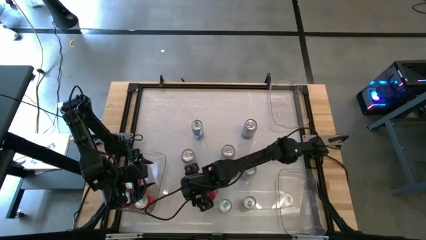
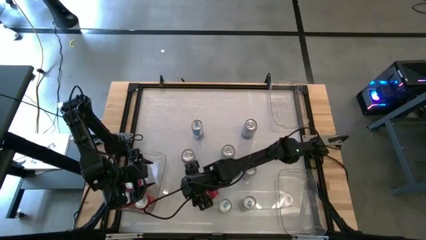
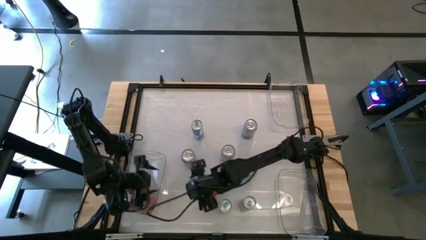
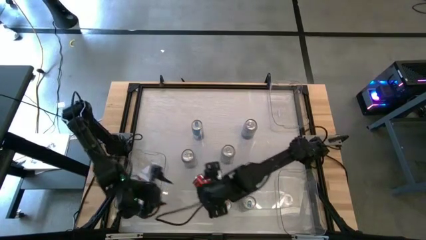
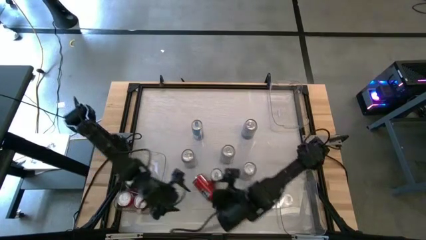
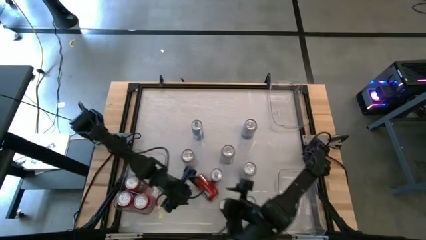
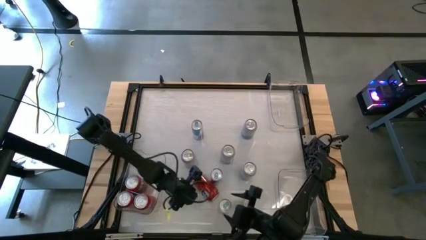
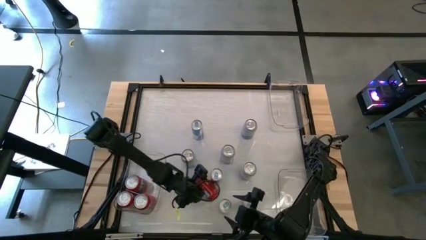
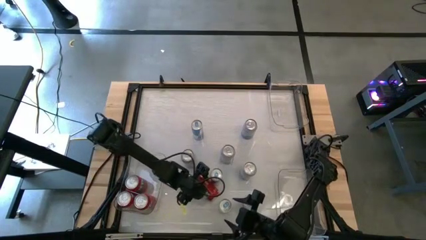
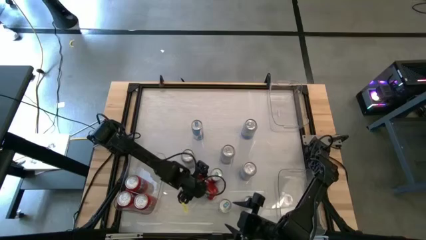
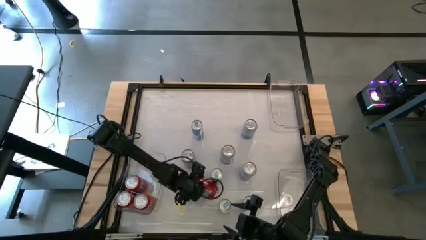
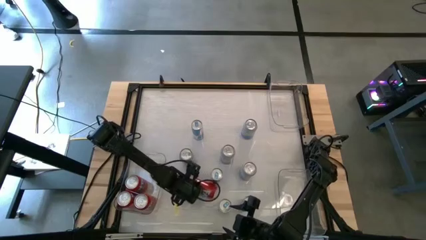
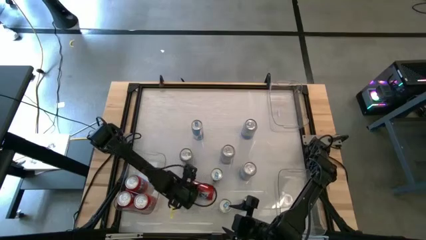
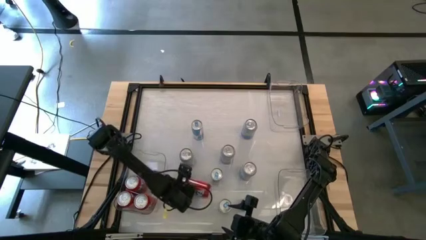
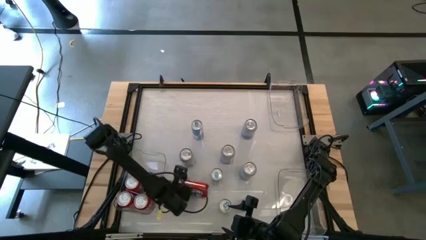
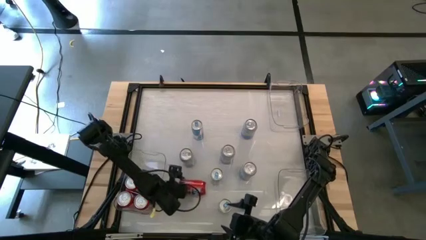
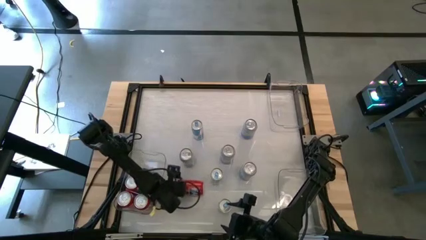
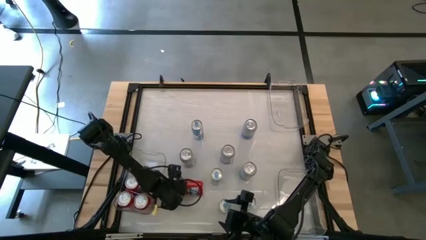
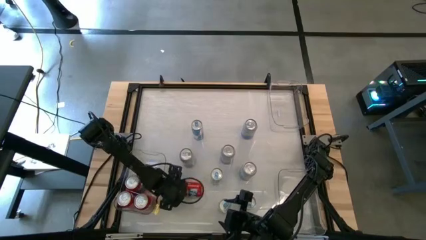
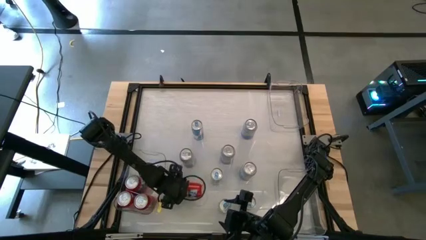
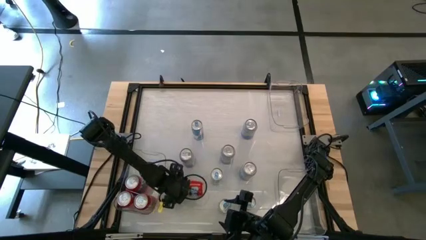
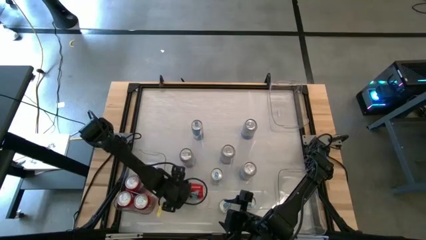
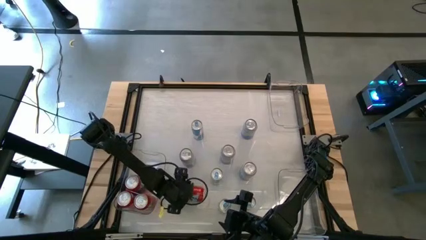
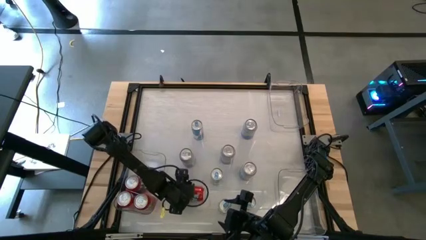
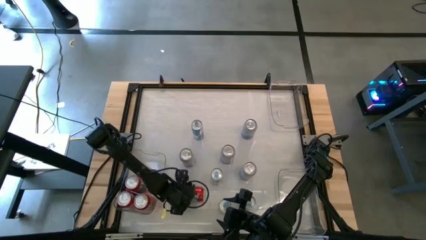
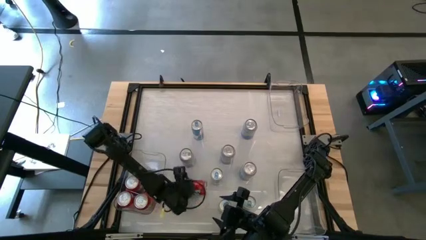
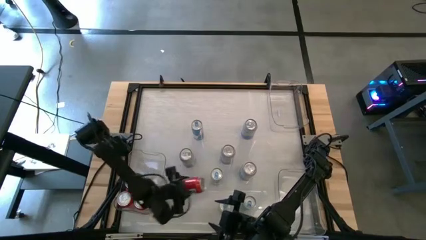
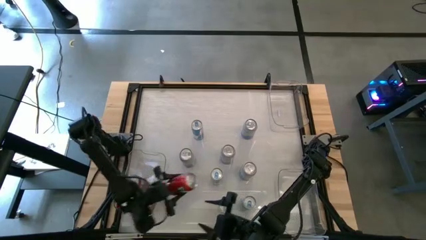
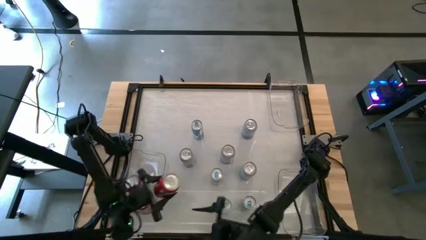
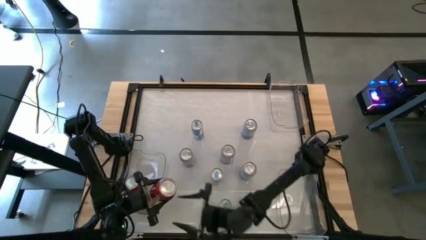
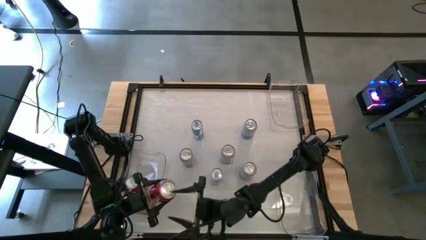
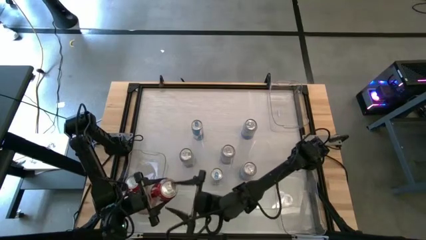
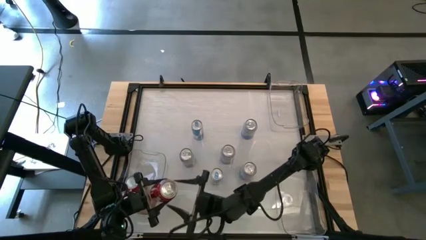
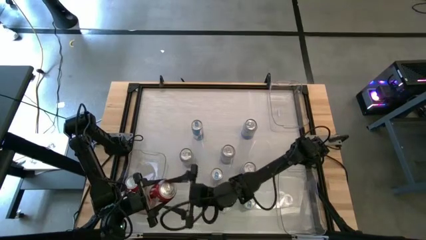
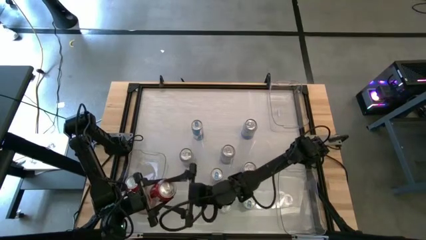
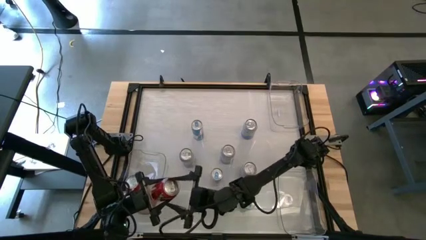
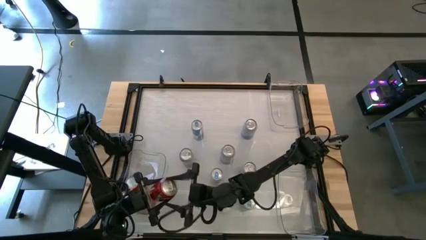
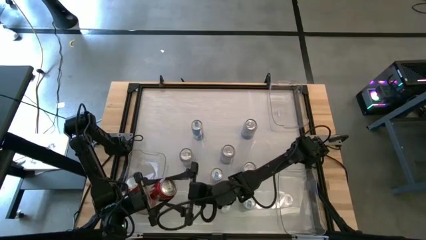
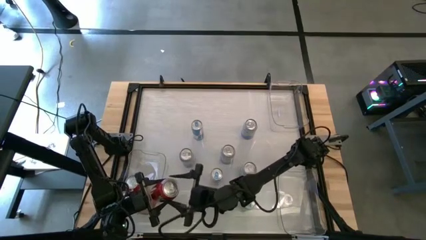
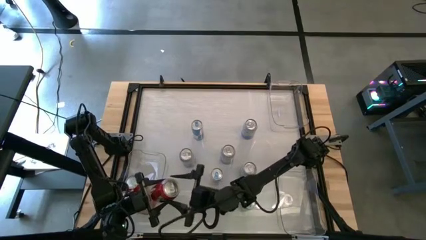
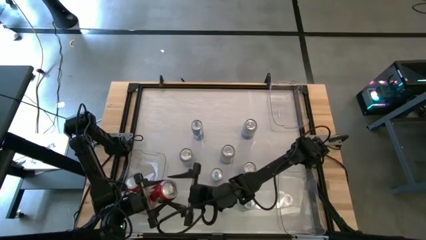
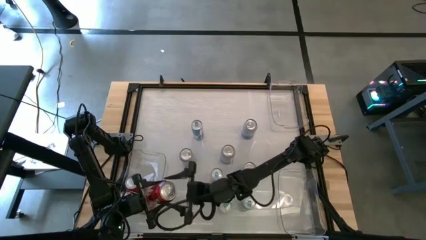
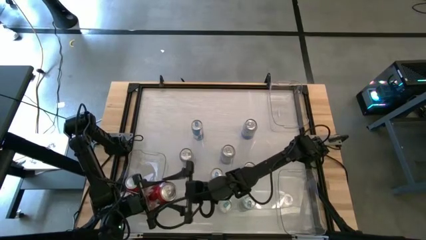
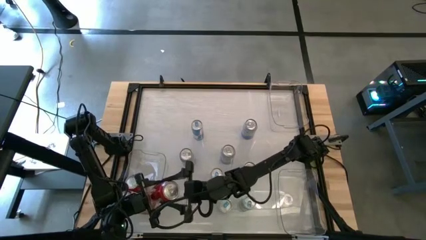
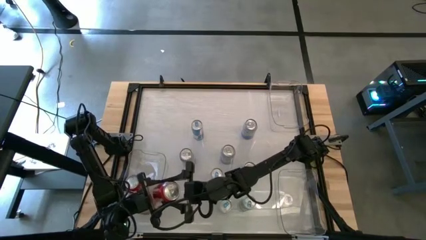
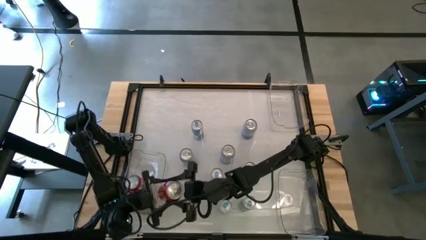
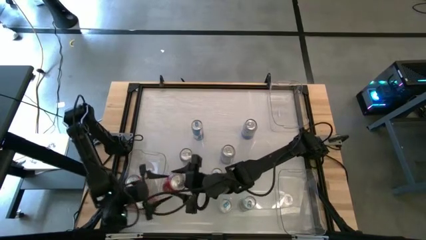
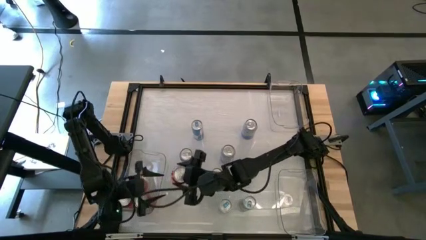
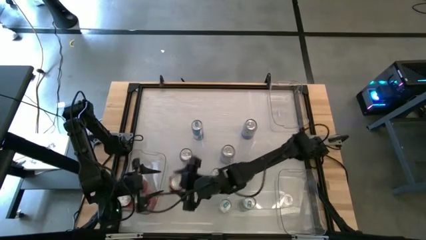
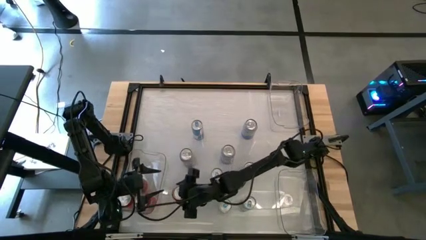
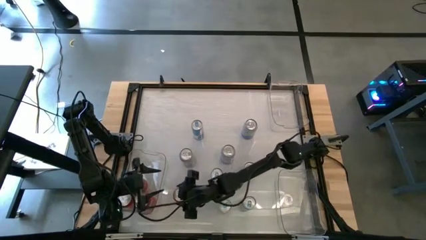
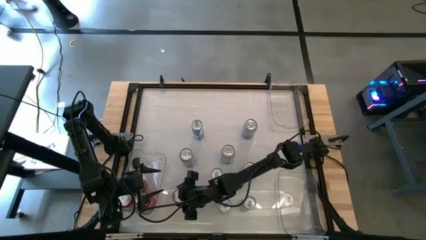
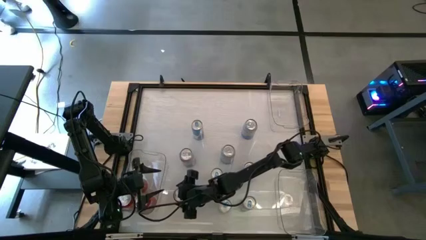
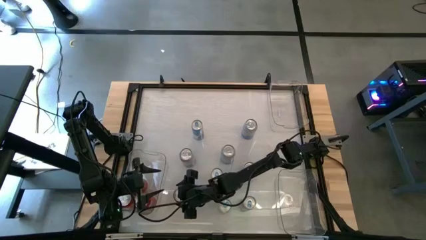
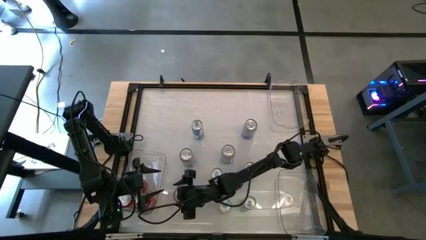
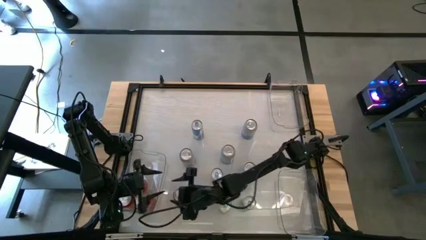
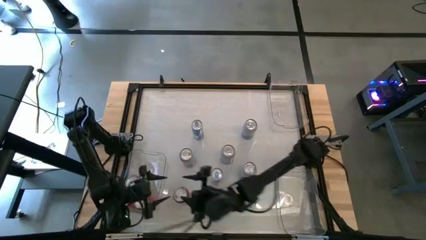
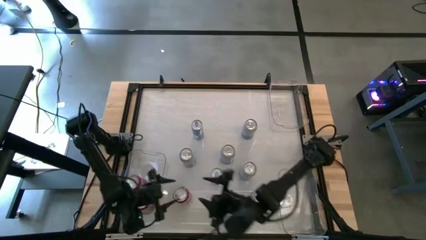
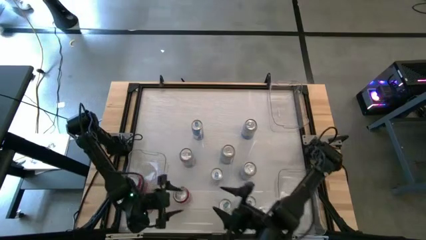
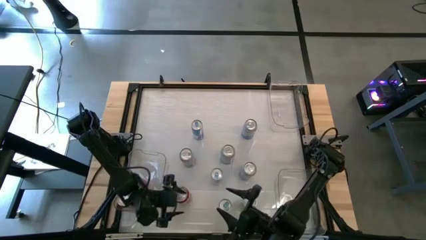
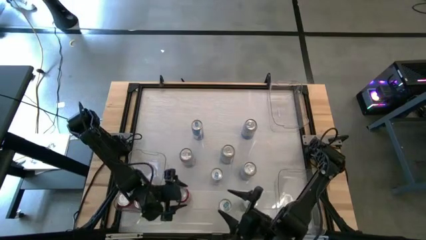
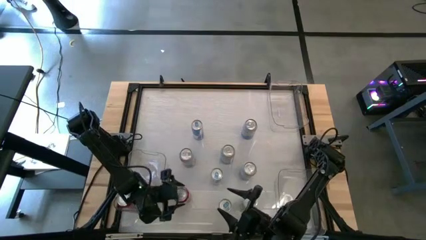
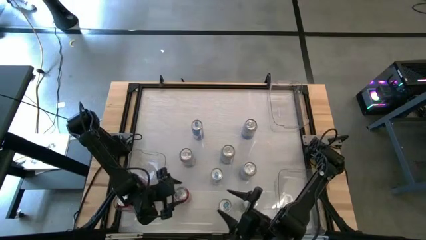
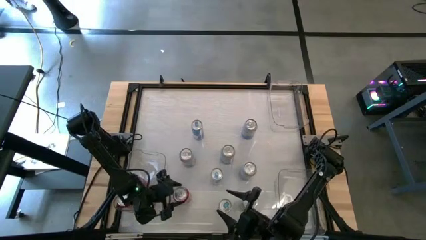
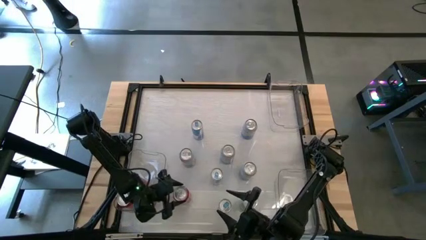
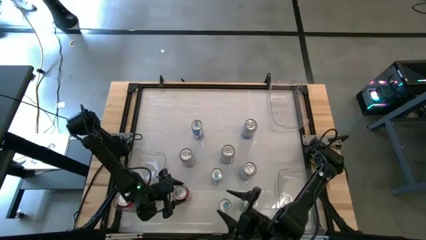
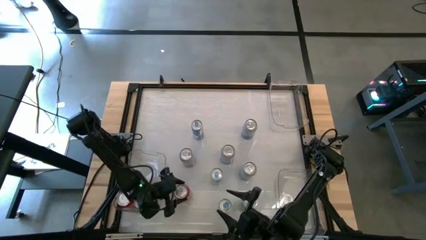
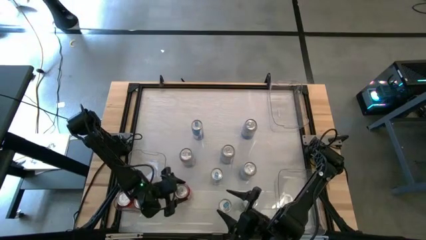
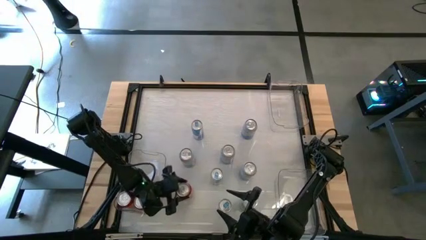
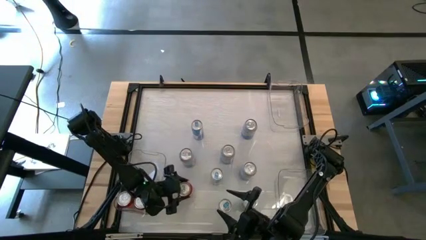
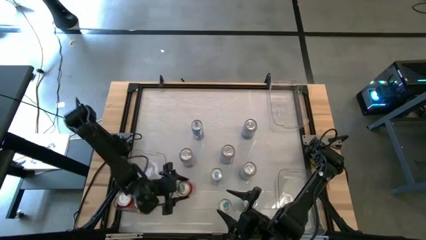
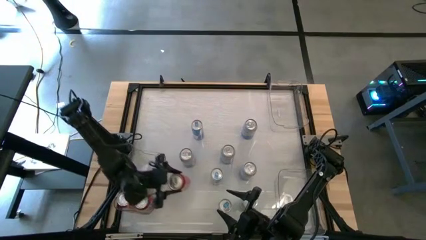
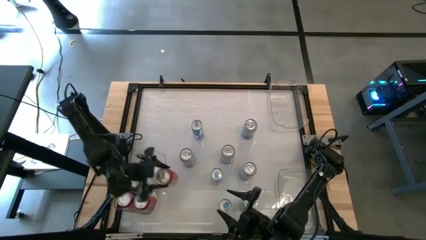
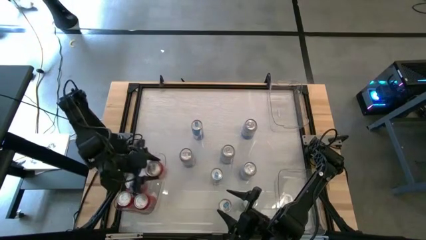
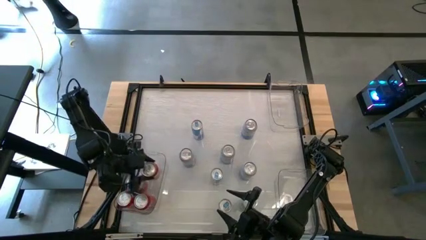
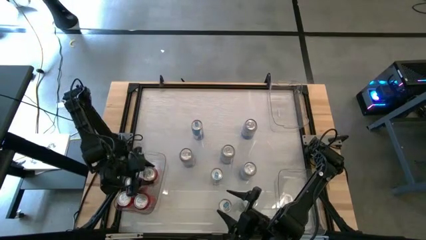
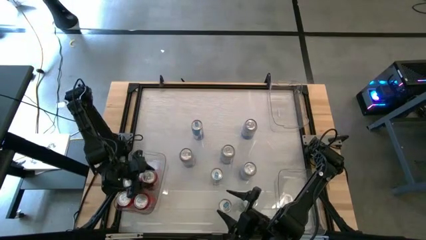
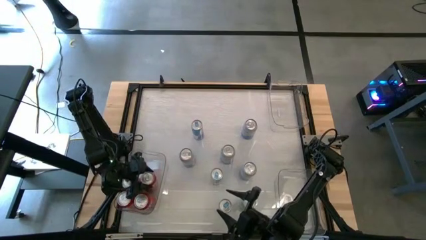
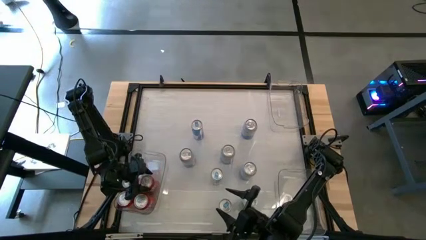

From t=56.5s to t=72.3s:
Task: Sort soda cans
Put the bottom right red soda can into the bottom left transparent bin

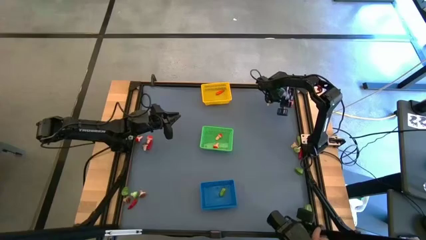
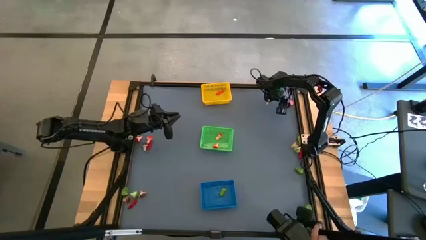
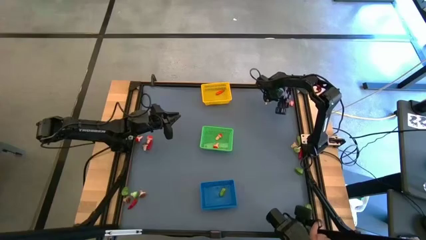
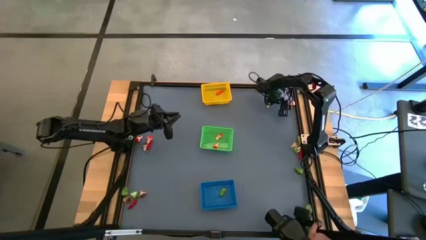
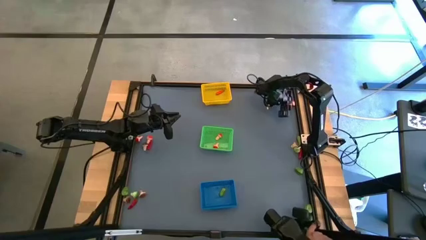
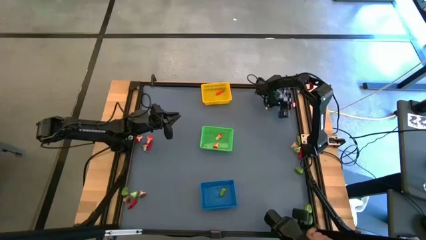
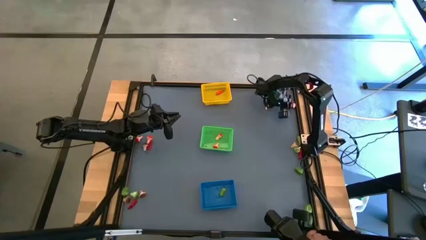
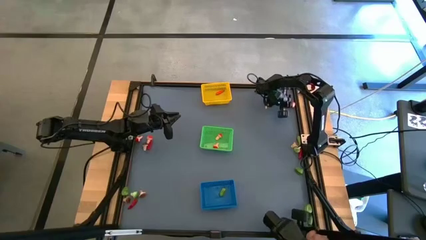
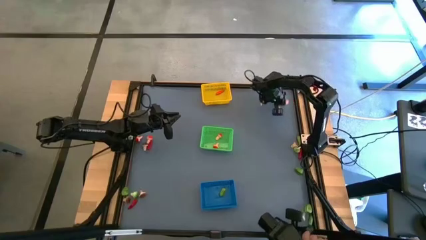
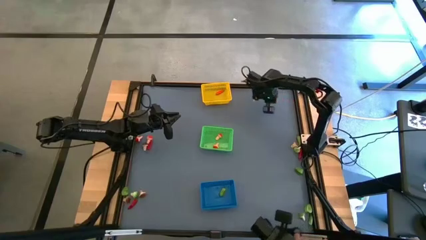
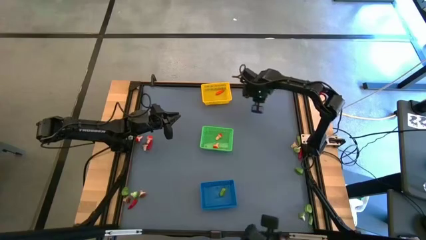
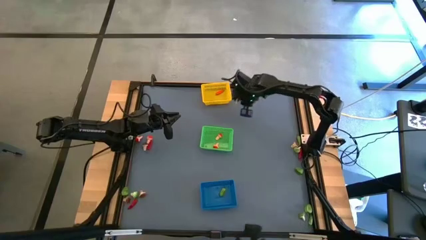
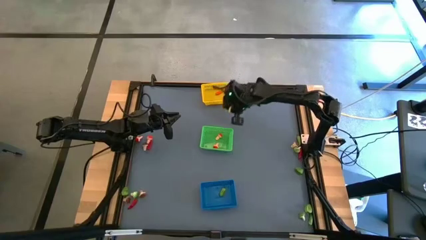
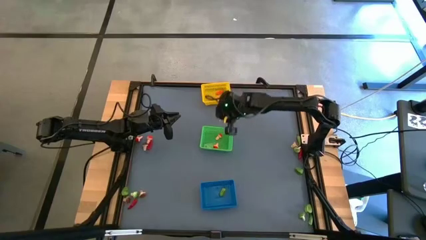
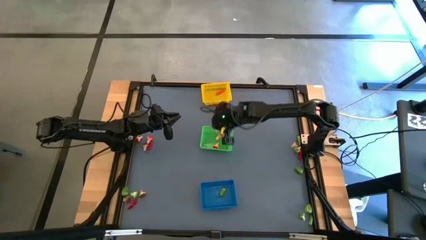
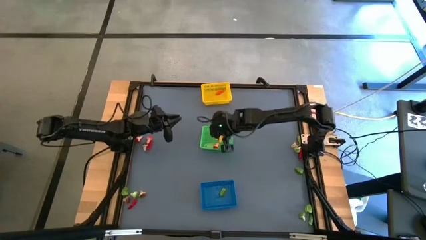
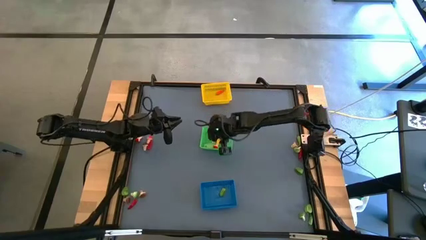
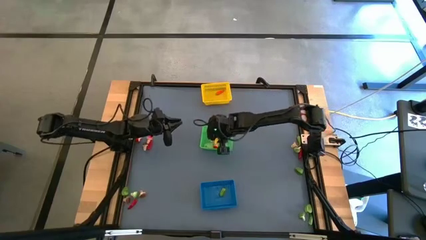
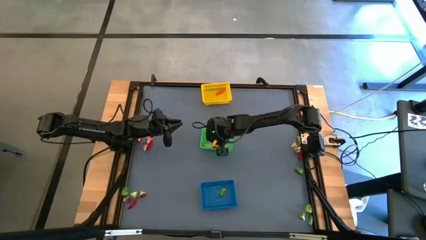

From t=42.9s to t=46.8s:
Task: Sort produce into baskets
Put the red mushroom into the green bin
